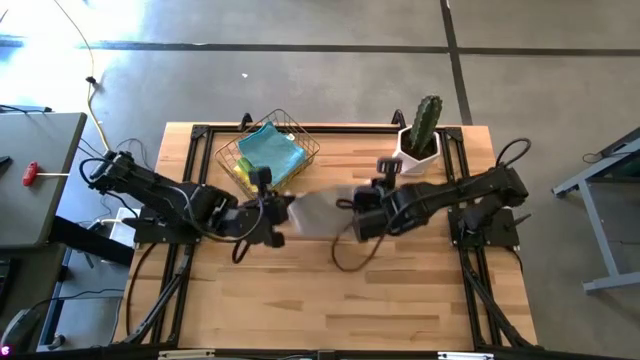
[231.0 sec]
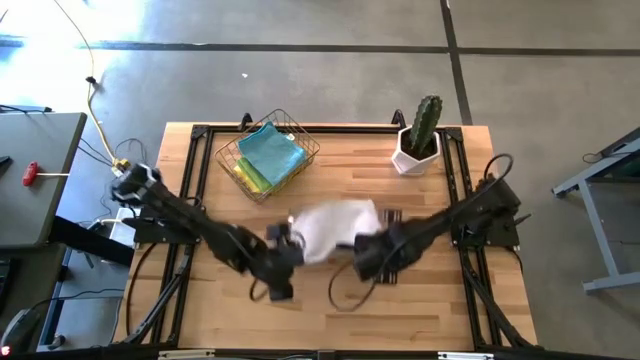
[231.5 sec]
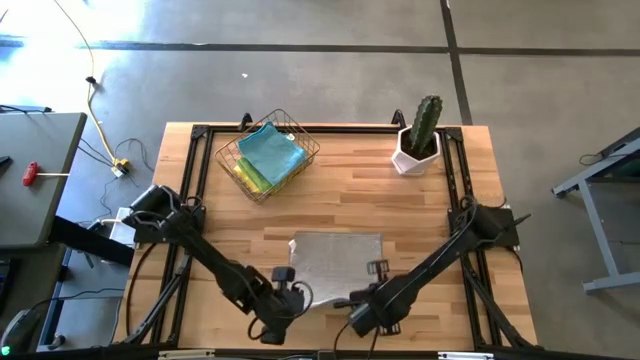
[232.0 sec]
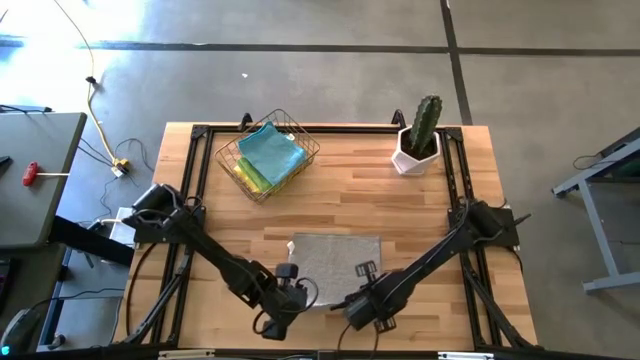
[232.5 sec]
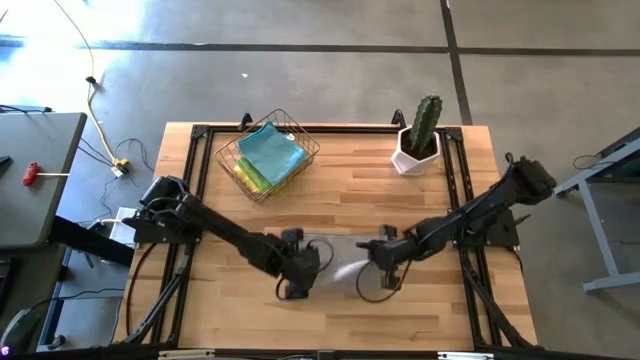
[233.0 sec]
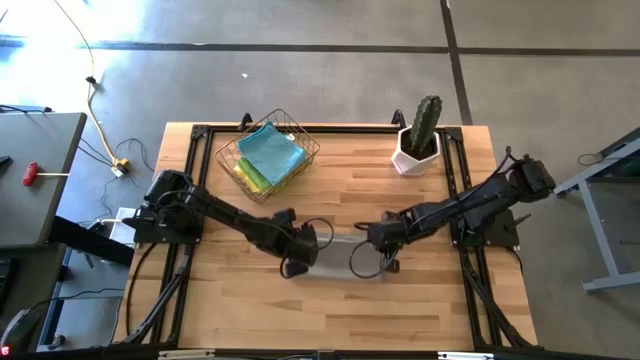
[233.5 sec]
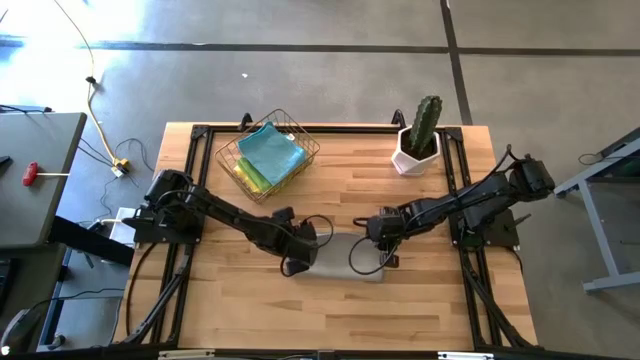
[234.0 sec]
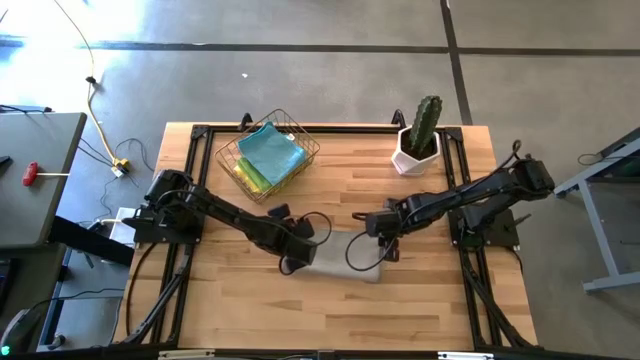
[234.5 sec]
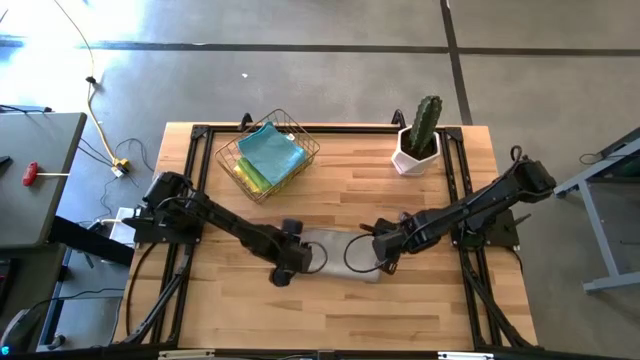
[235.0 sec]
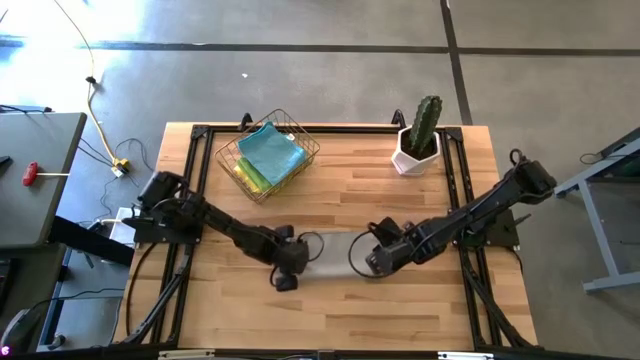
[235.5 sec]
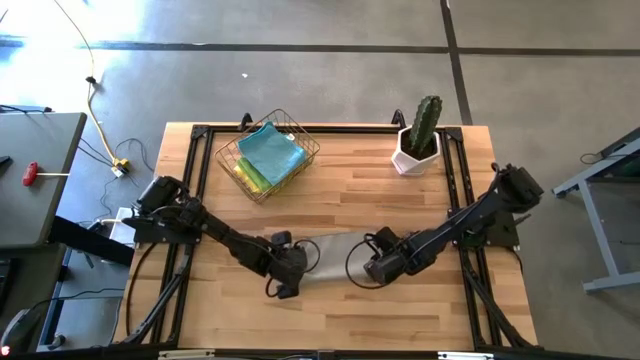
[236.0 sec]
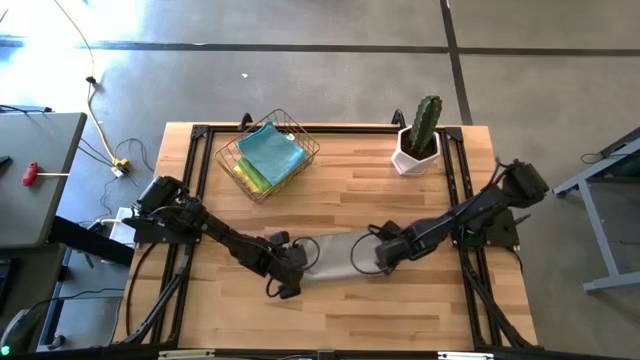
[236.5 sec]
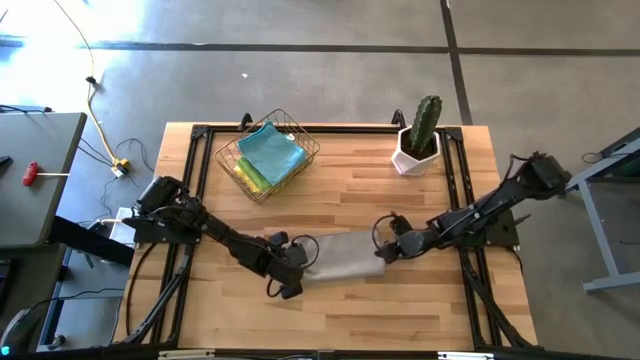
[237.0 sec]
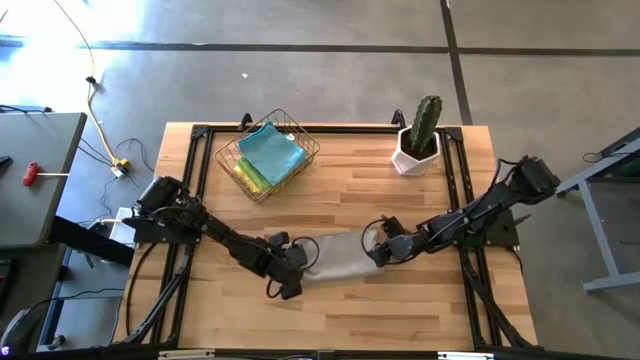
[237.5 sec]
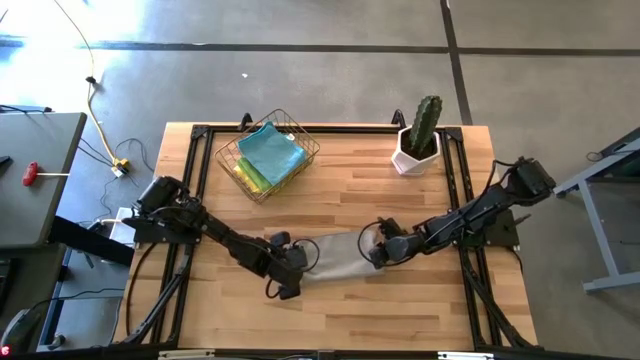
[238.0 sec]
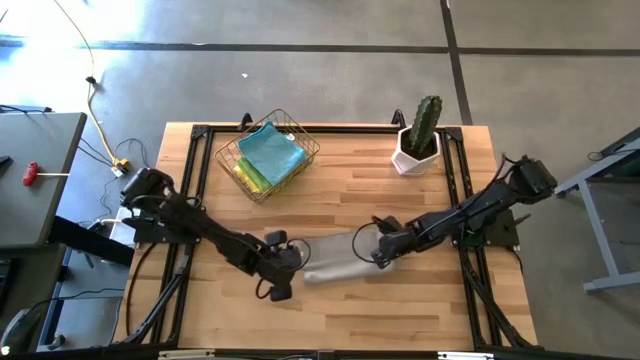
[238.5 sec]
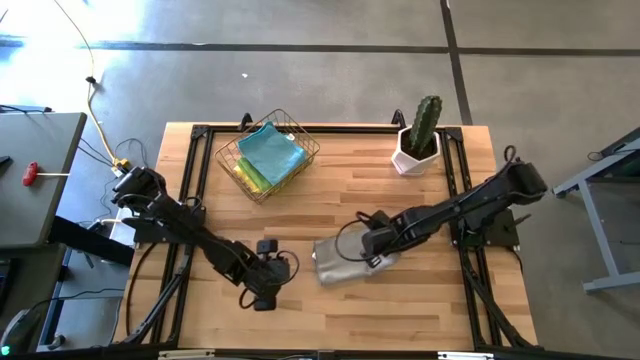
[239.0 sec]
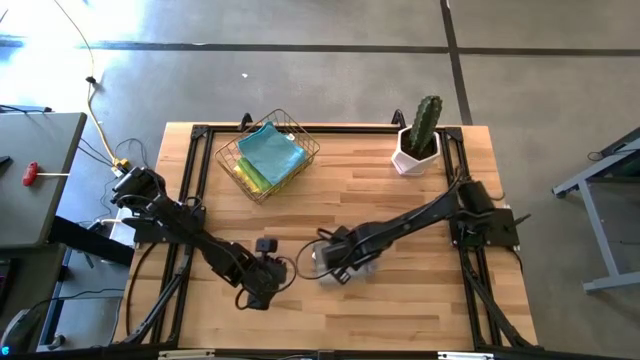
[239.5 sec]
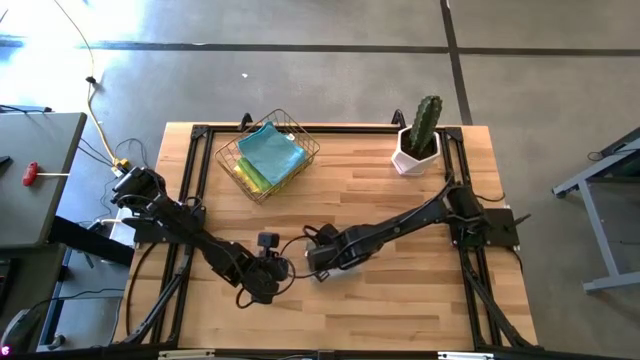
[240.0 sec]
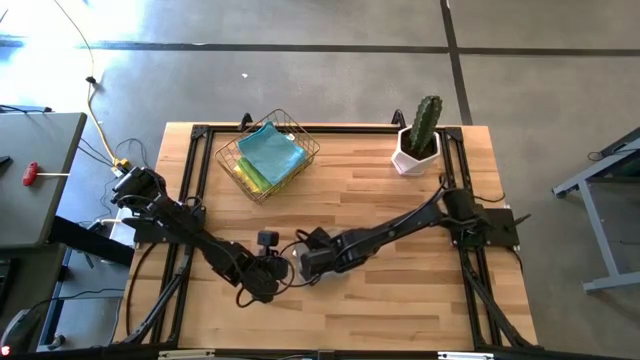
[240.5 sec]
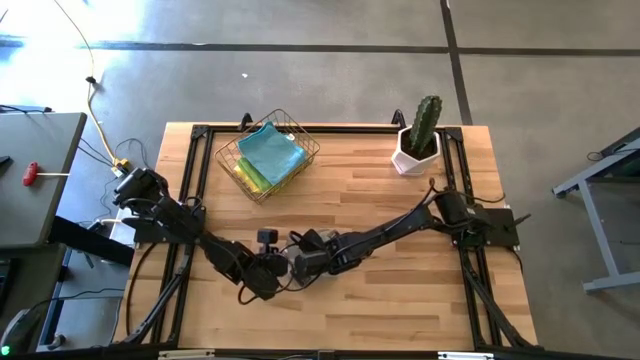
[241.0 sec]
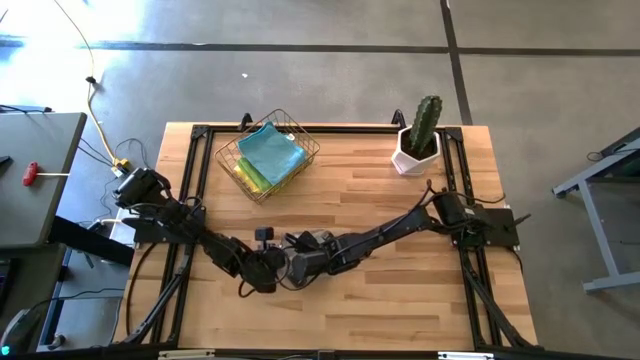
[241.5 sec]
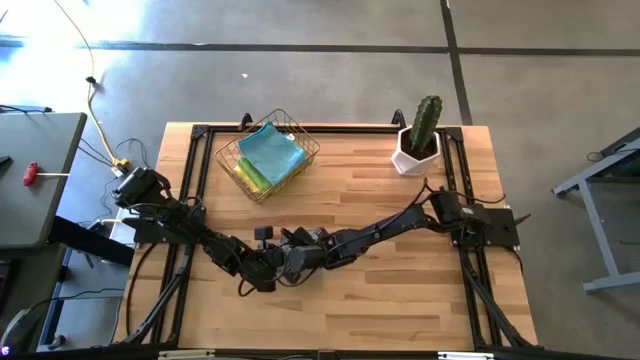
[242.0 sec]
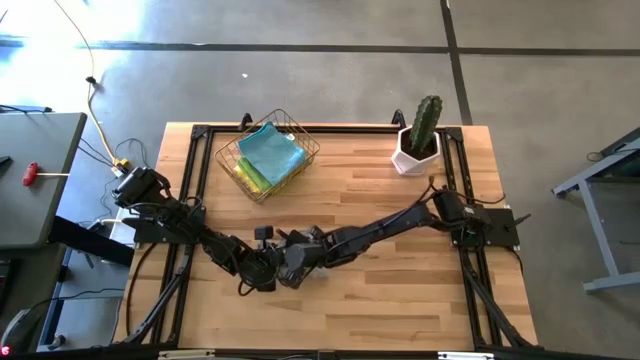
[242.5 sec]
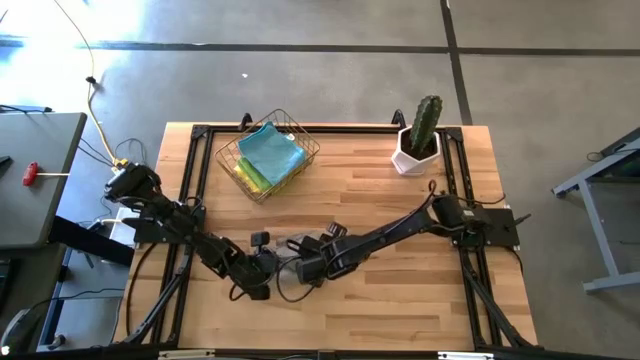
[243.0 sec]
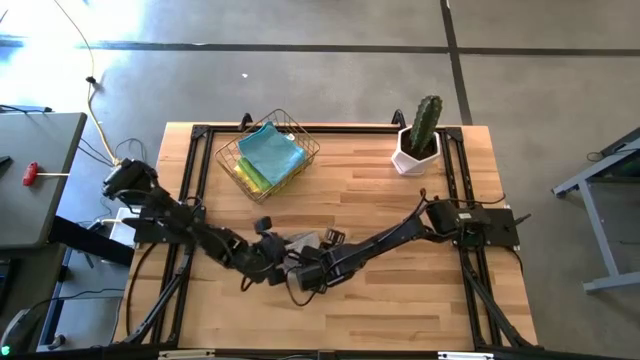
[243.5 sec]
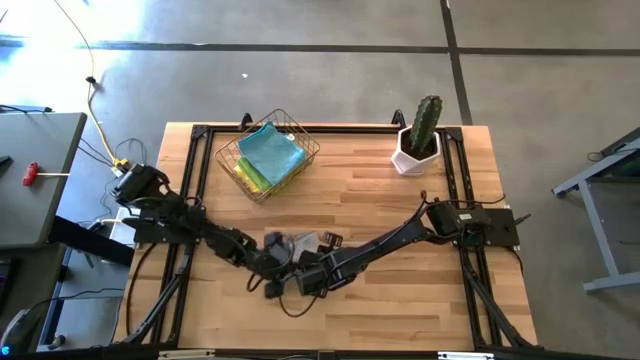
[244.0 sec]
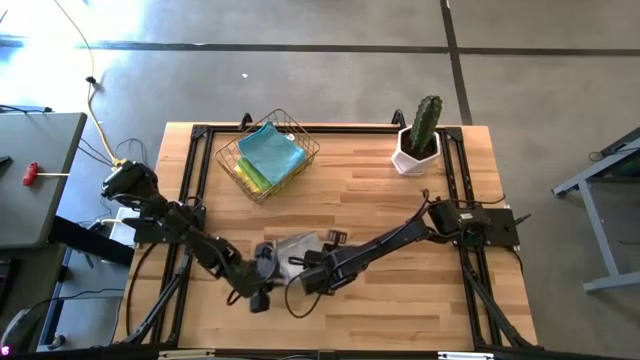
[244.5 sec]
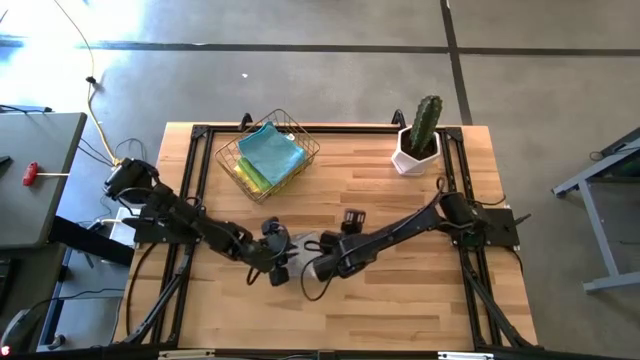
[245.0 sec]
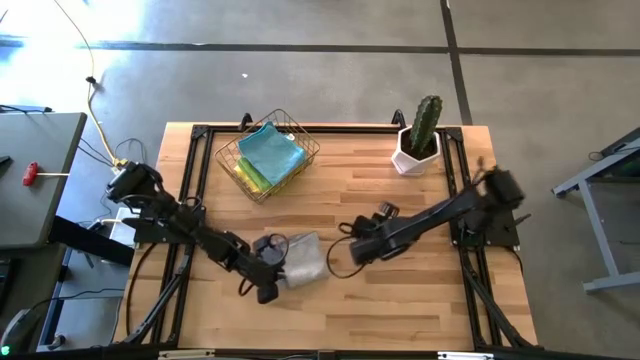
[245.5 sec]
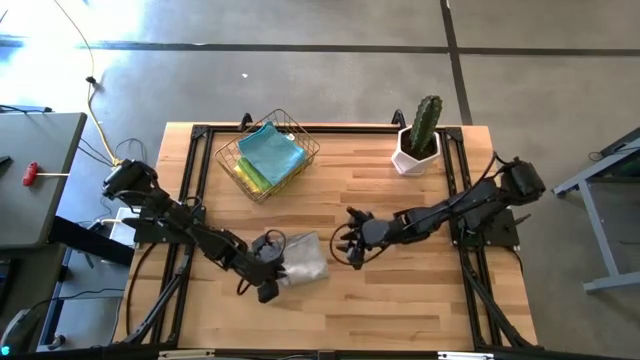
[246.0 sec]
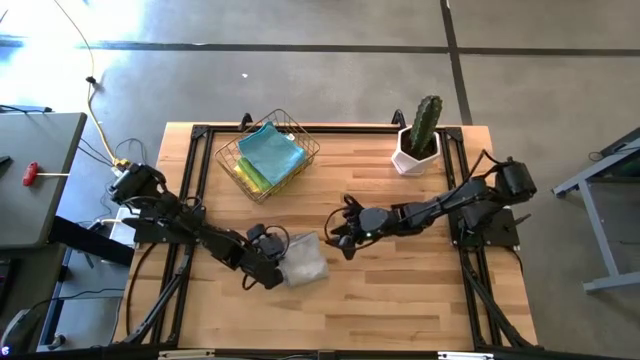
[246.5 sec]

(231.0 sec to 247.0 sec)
Task: Fold microfiber towels
Fold the gray microfiber towel

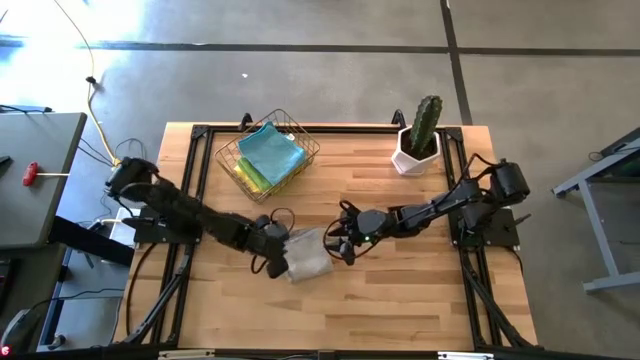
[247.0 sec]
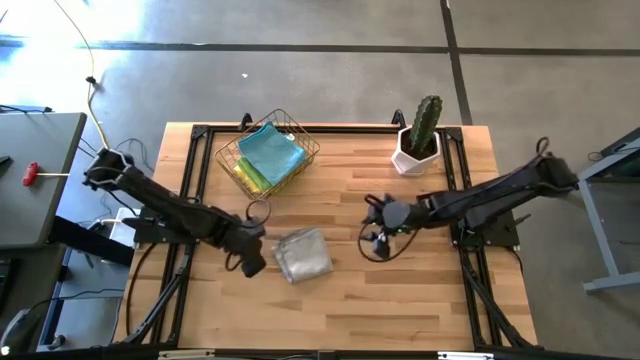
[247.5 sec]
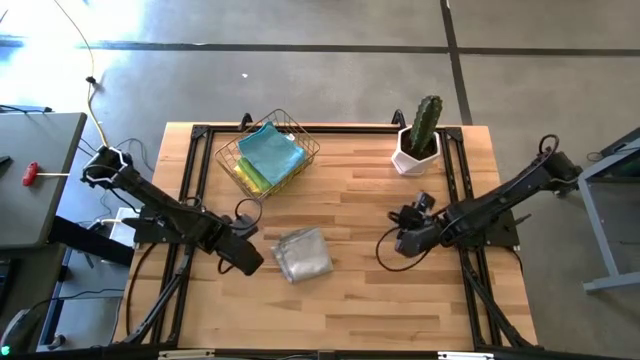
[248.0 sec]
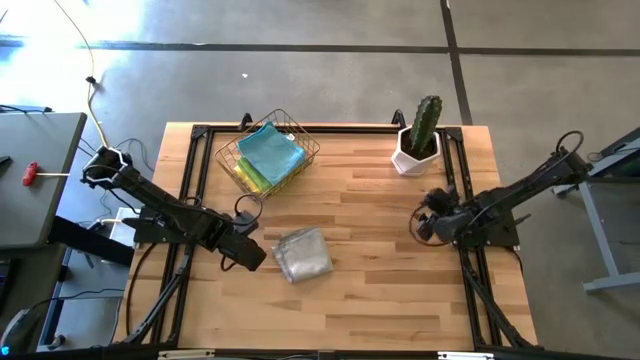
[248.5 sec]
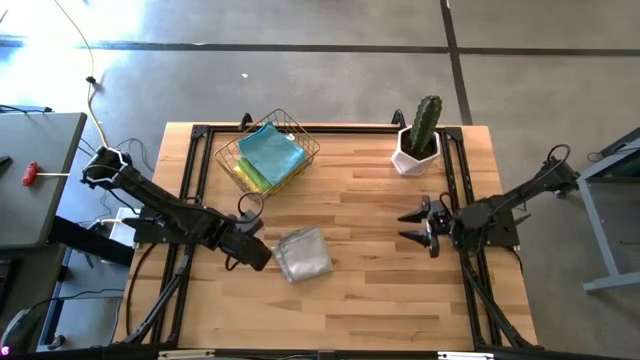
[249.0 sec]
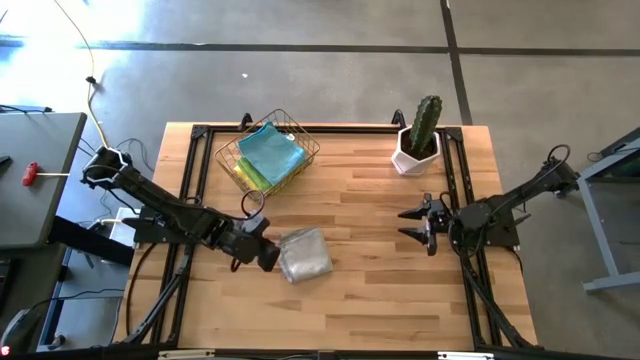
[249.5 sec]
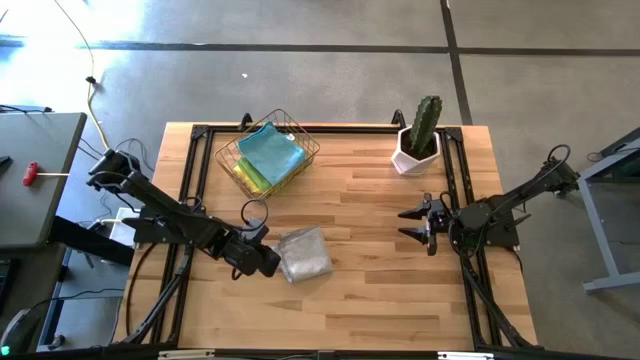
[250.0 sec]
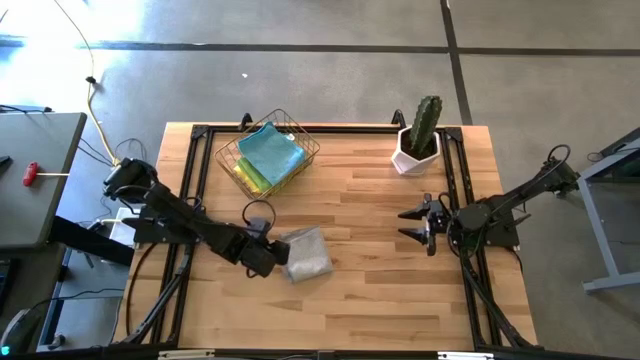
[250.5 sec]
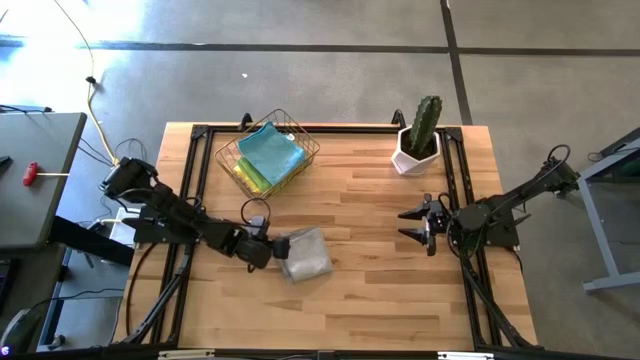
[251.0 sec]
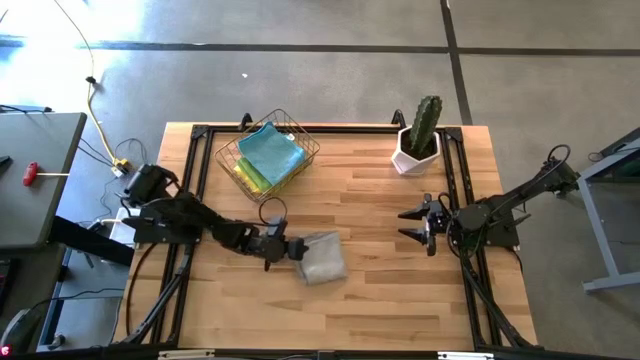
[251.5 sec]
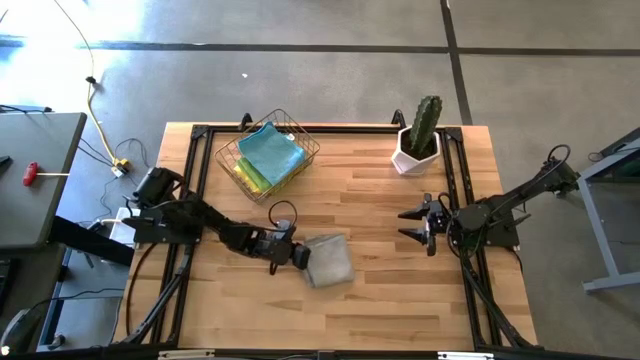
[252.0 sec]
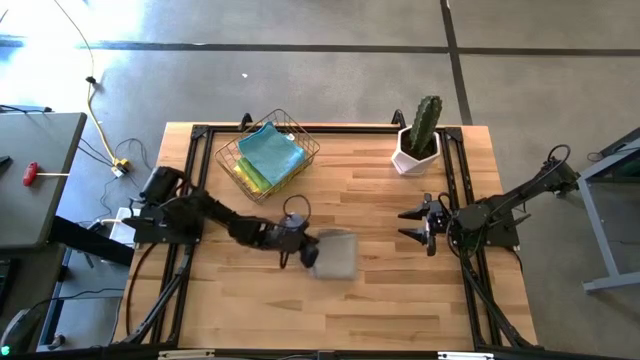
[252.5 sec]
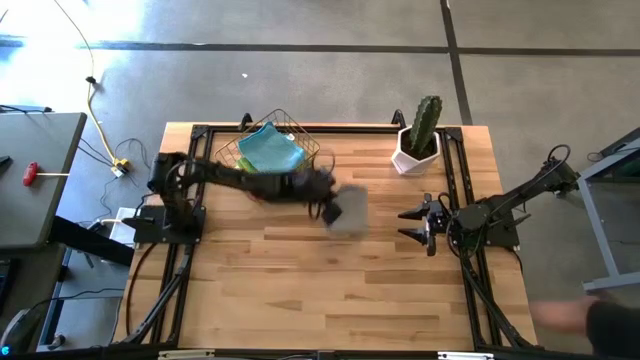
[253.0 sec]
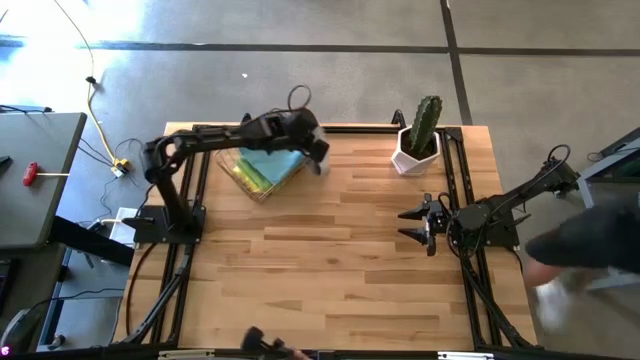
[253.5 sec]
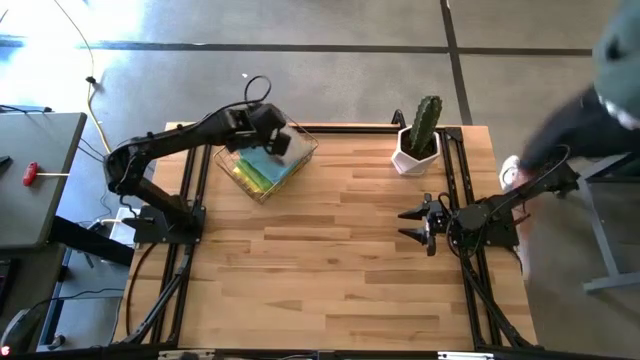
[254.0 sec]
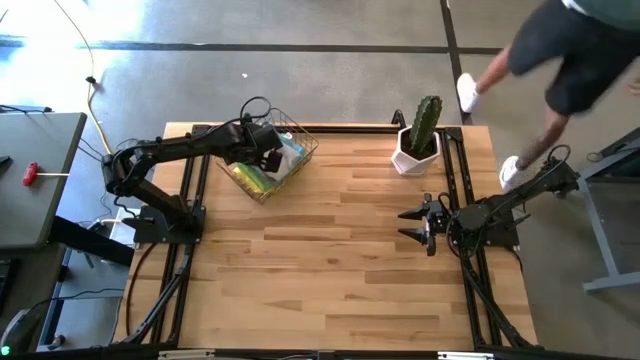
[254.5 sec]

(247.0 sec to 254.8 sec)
Put the folded gray microfiber towel into the wire basket
